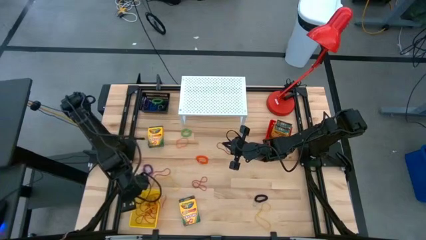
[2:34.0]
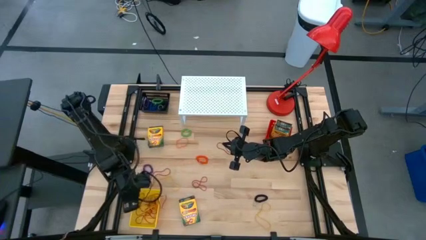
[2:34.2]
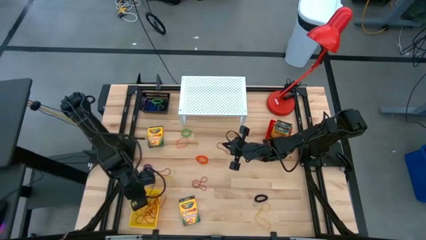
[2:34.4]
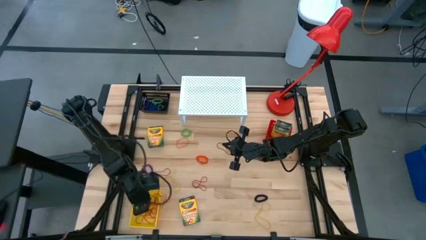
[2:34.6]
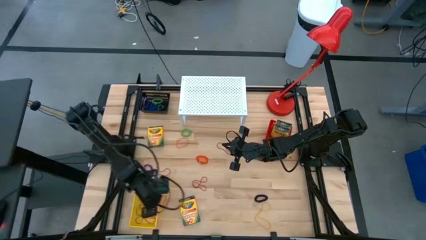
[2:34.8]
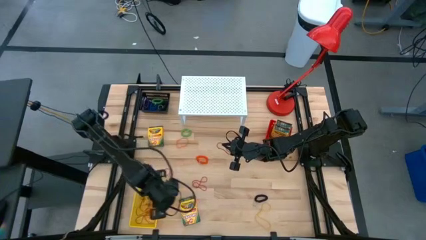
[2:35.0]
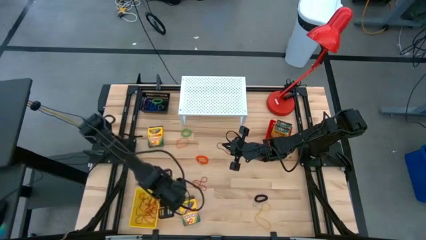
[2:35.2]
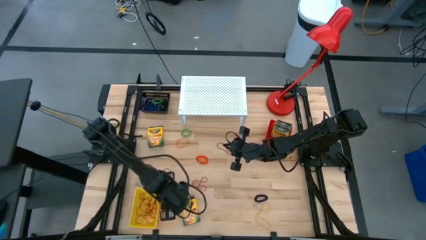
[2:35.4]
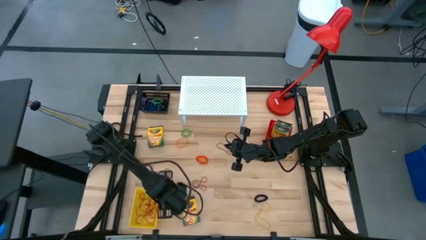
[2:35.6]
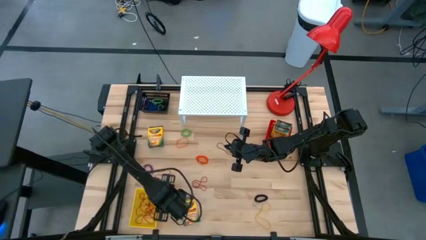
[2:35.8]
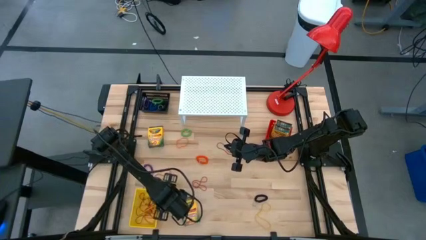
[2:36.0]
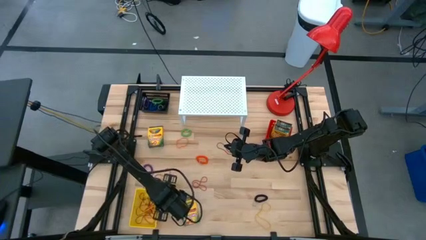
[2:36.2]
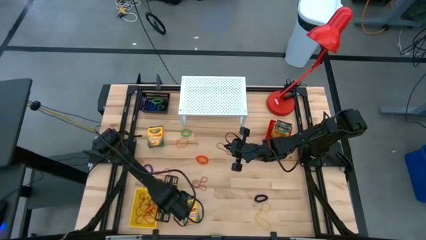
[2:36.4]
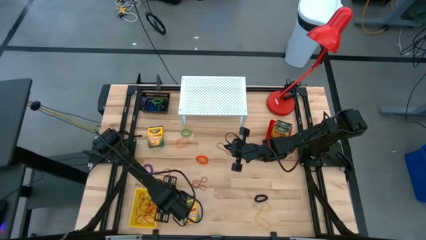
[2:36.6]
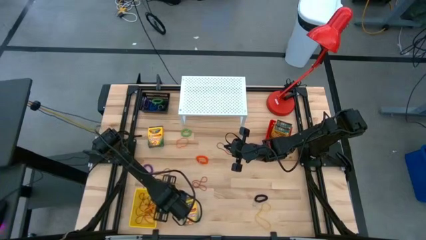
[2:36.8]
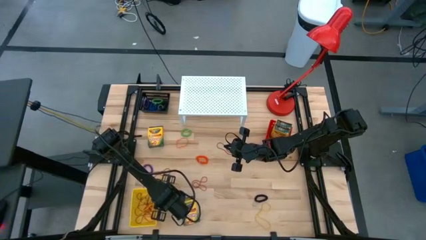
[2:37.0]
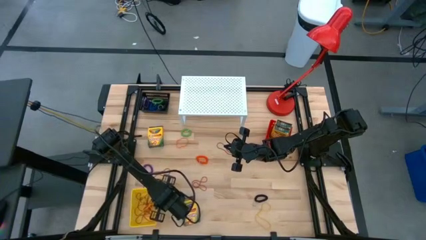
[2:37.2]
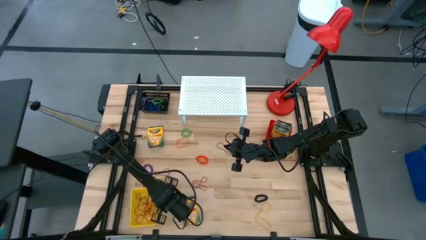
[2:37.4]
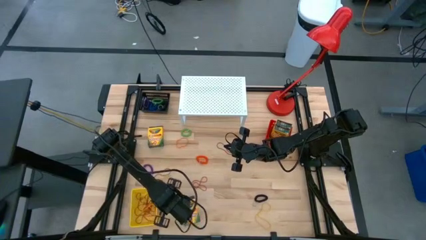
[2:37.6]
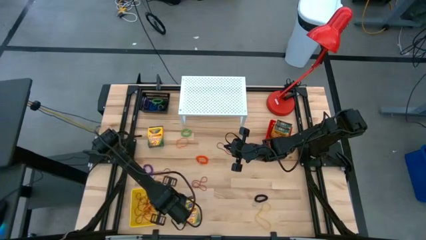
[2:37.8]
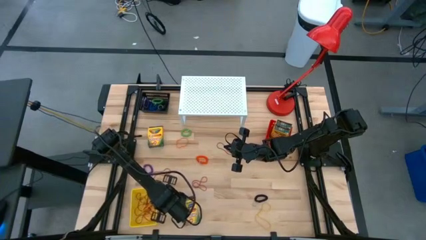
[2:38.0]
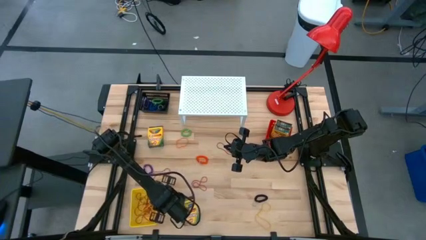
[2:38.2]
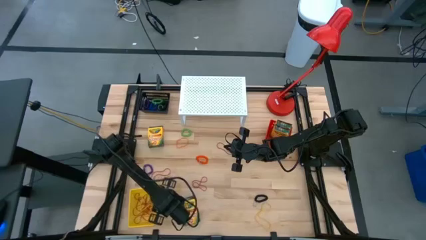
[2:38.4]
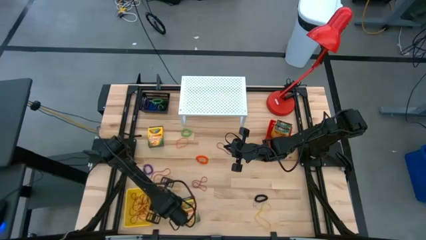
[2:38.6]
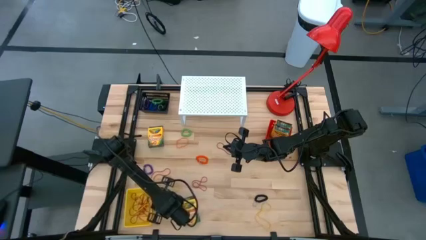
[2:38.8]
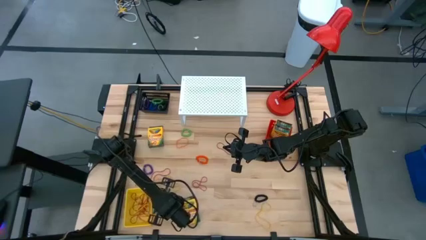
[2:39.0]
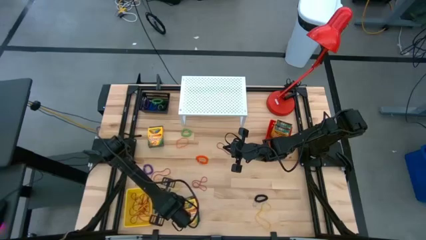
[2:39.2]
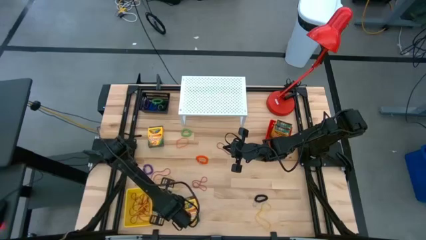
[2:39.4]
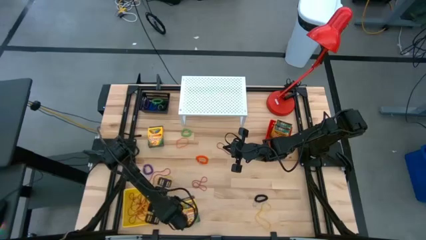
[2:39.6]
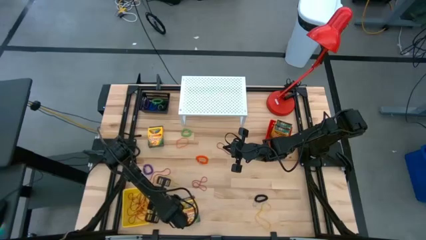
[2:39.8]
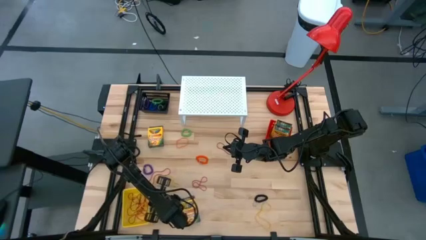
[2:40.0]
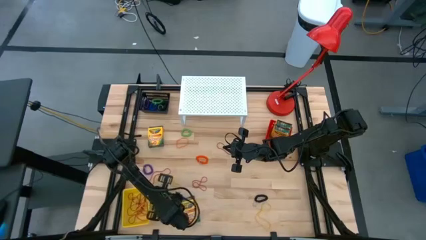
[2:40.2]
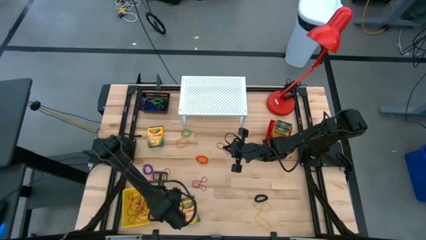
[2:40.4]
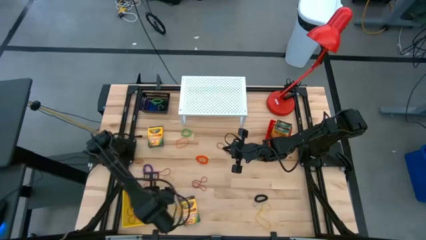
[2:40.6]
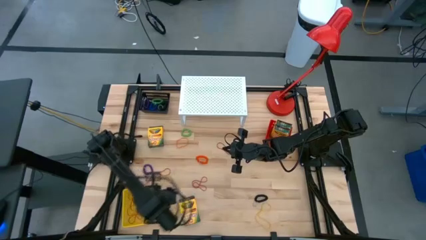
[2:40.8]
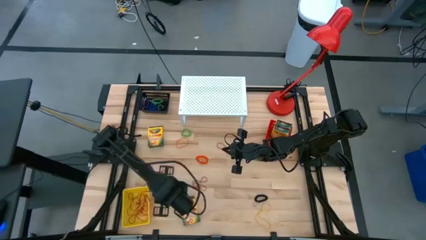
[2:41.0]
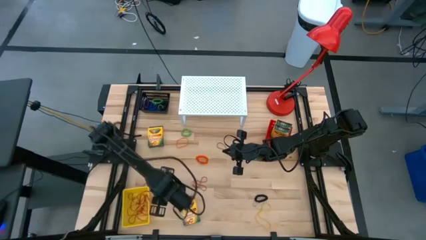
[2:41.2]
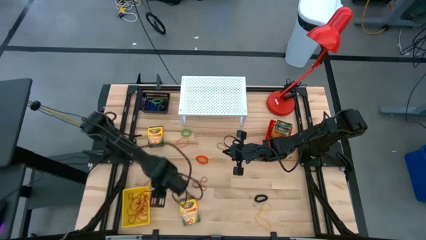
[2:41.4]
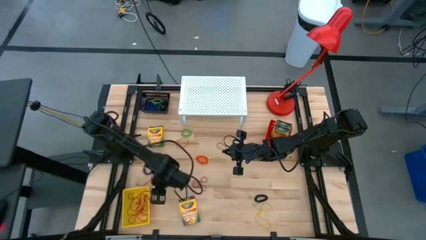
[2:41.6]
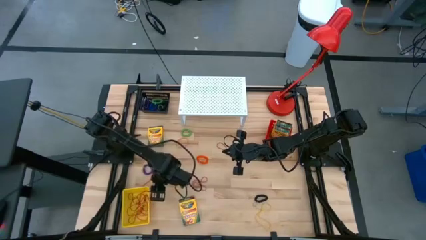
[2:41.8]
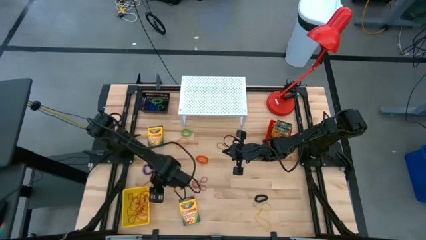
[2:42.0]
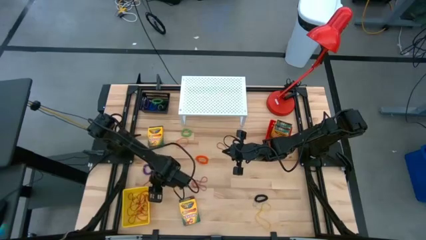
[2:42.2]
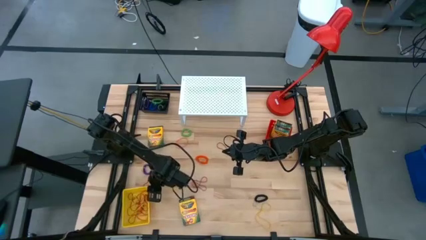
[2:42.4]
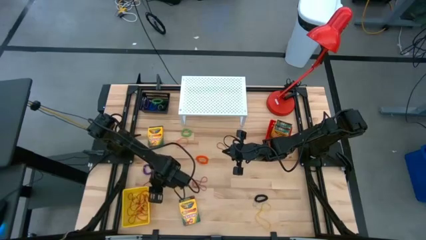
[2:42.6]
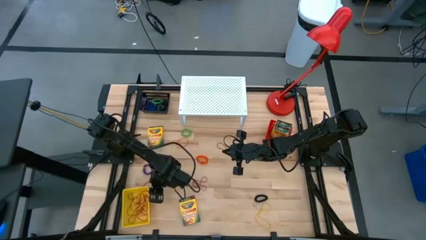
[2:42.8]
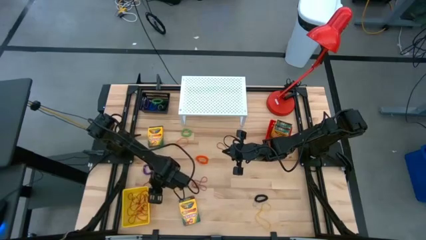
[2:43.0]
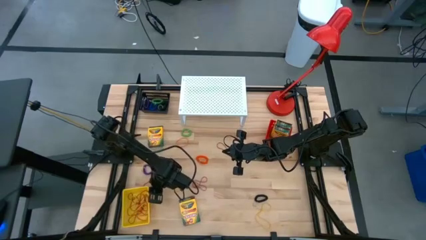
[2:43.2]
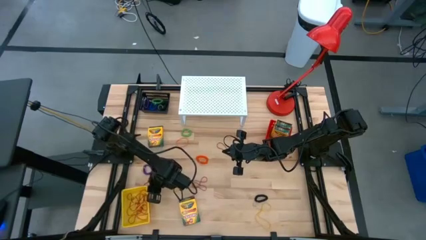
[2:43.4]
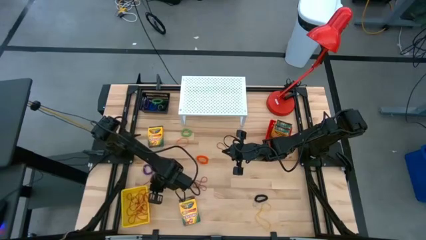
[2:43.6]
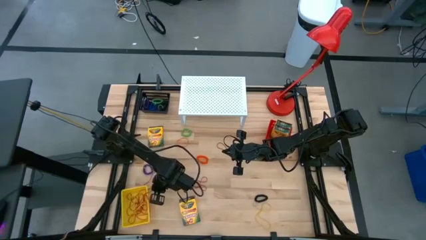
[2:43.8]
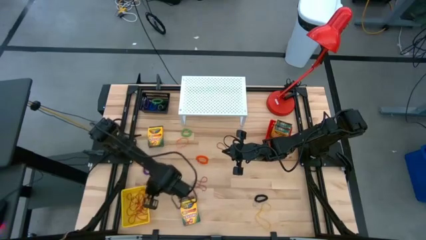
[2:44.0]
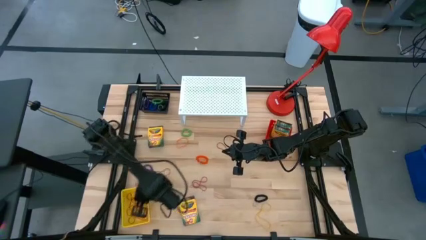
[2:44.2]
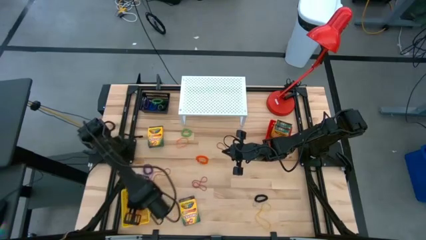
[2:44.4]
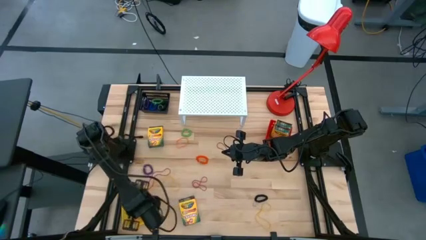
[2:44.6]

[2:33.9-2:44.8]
Task: Pick & Place Office Desk Supplies
Put the red rubber band into the yellow bin

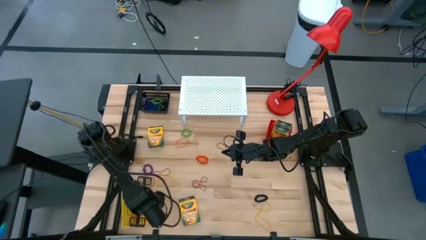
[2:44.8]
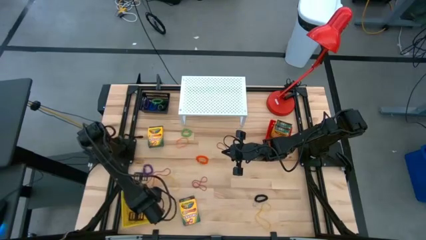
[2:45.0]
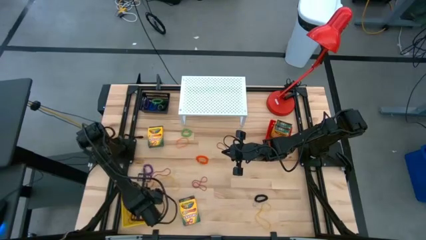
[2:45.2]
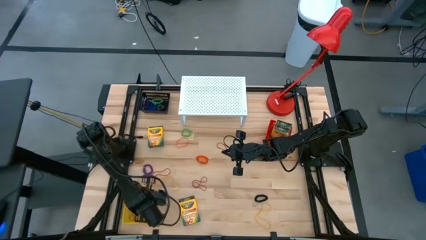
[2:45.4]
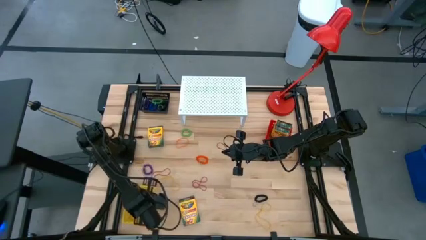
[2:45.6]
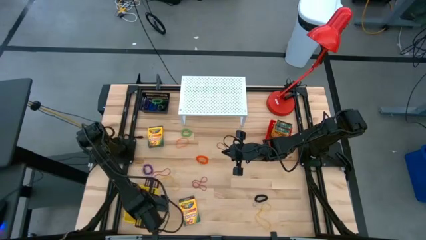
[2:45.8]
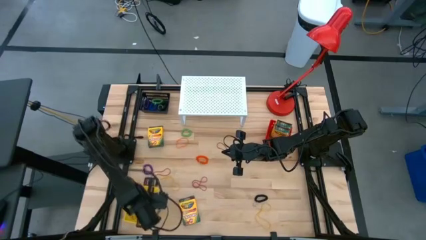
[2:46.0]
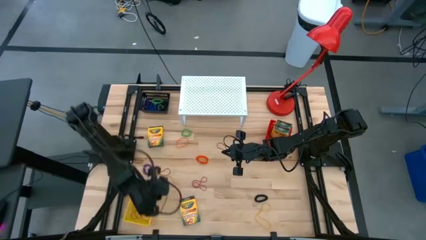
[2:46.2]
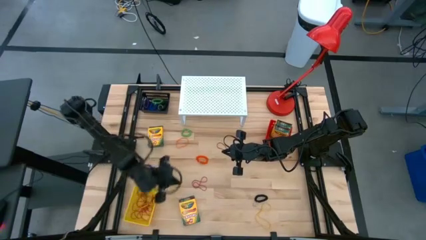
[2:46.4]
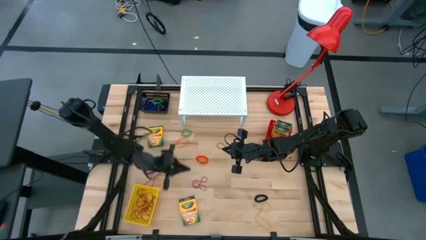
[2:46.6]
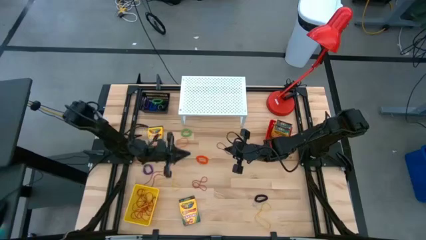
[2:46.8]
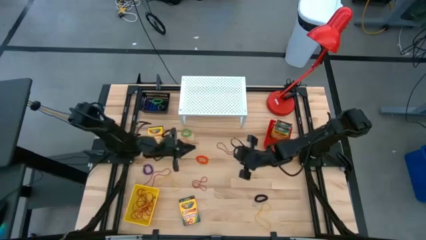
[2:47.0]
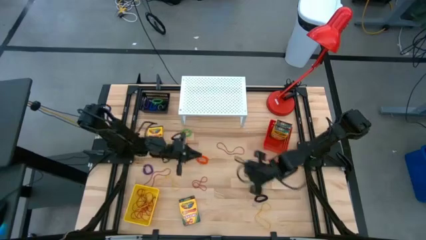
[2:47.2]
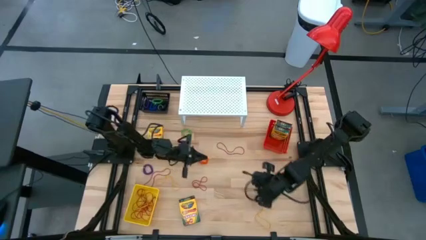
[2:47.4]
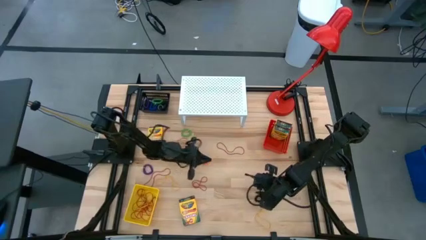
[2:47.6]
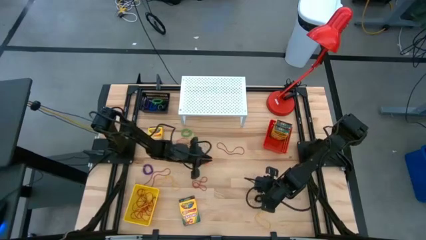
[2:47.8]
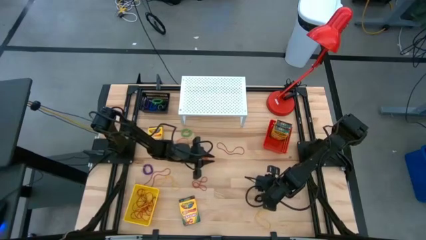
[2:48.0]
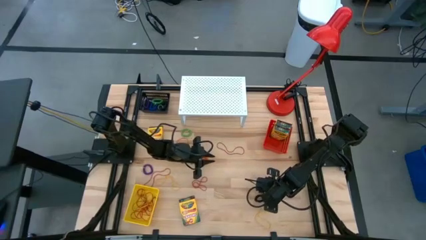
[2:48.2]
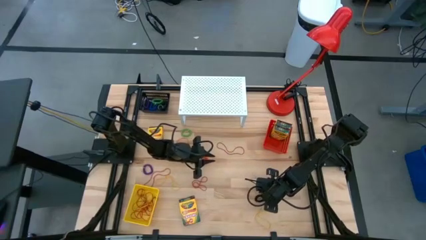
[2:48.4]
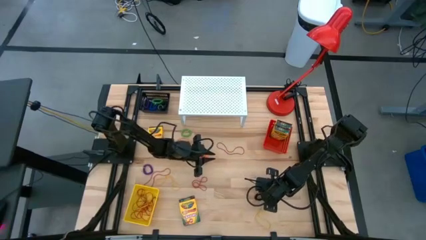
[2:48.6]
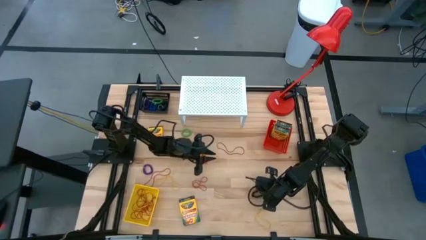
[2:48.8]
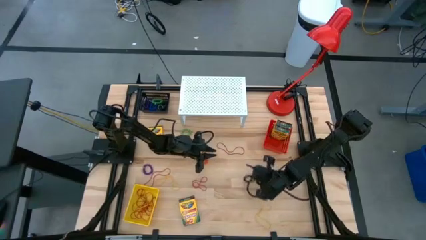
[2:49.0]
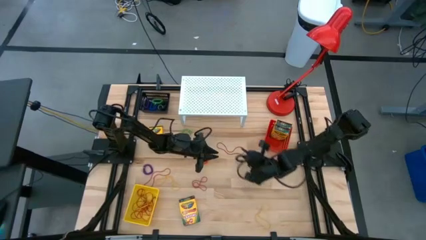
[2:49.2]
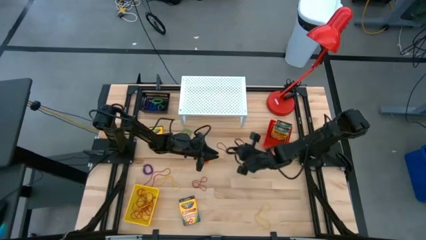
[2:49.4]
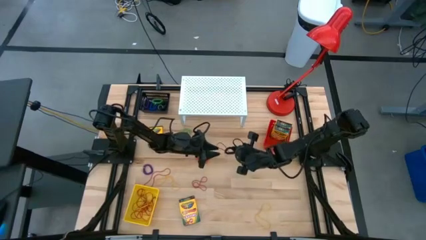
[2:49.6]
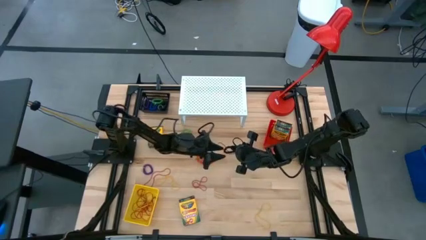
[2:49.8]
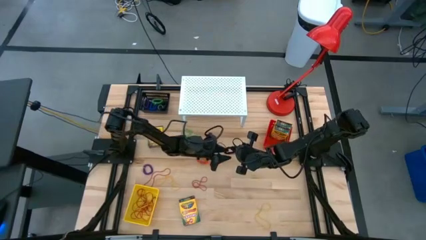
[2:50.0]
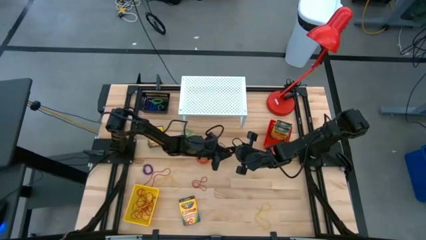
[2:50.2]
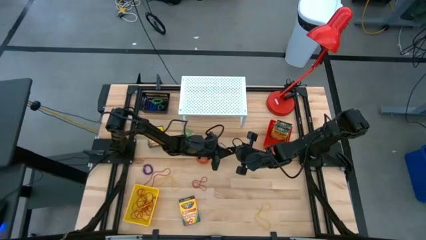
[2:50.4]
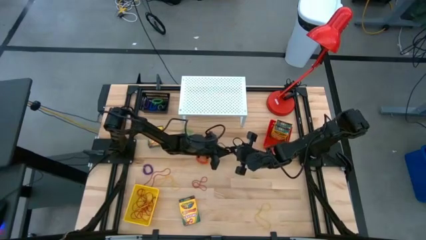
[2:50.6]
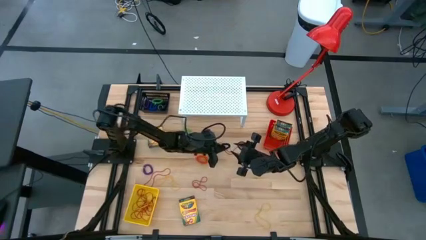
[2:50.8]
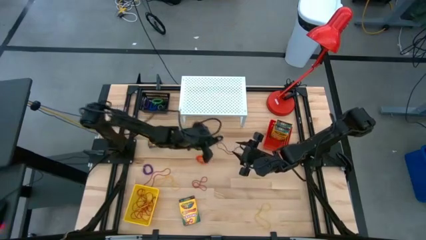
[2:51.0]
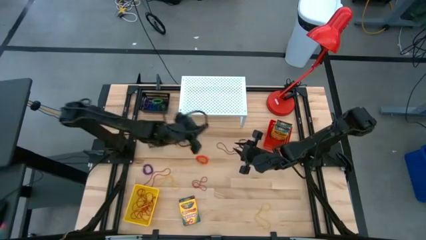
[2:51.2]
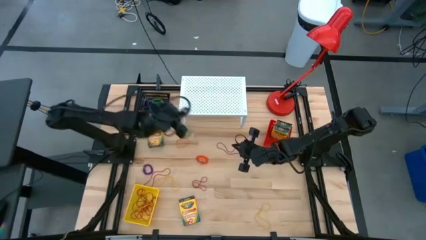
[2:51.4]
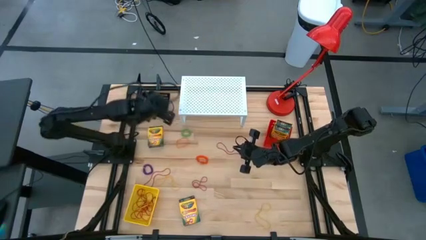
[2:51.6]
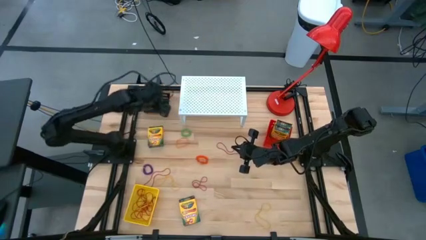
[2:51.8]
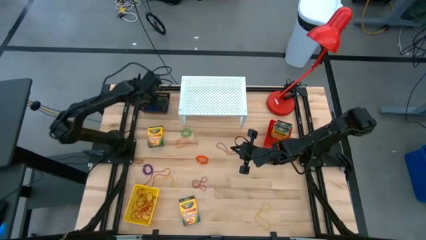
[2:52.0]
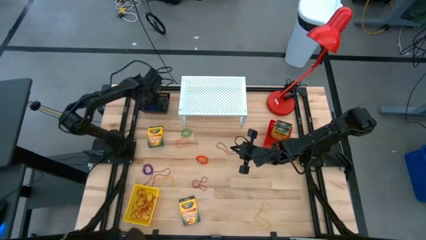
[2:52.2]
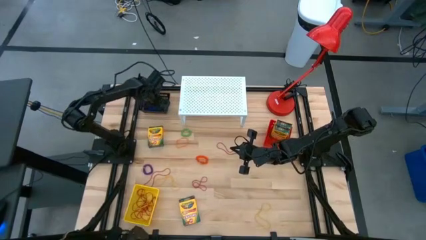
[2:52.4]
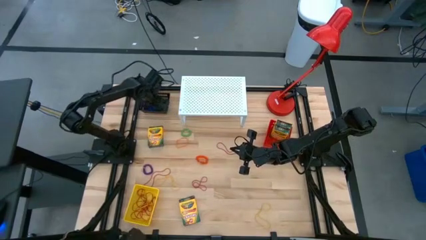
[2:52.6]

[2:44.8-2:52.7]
Put the black spring rubber band into the black bin
